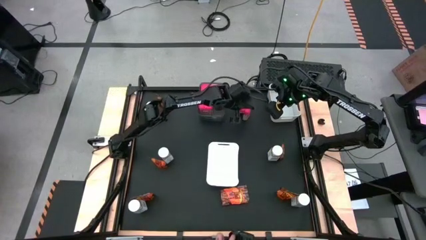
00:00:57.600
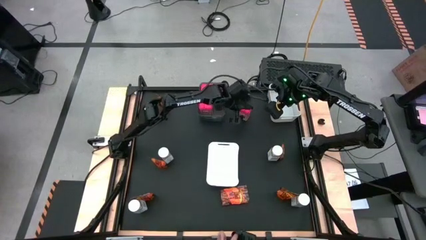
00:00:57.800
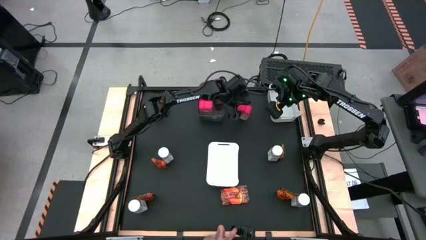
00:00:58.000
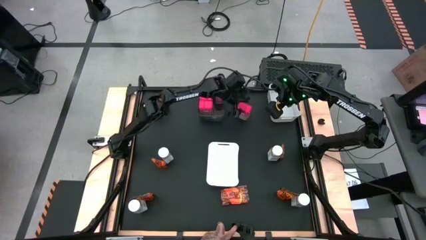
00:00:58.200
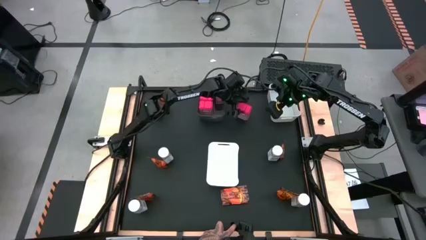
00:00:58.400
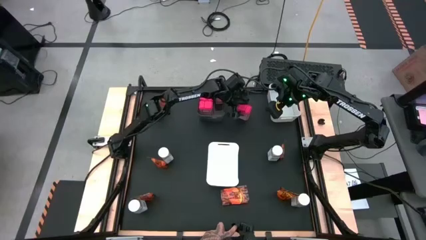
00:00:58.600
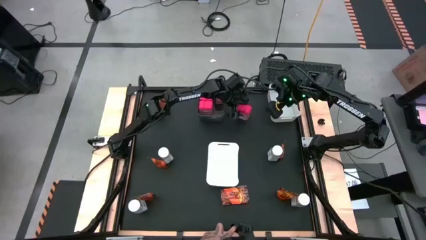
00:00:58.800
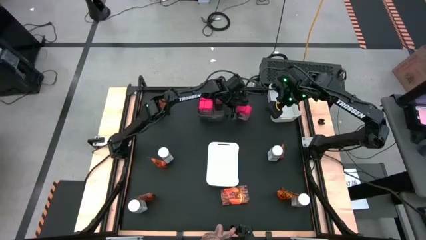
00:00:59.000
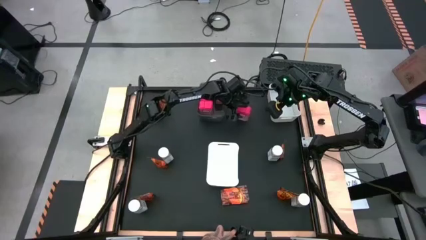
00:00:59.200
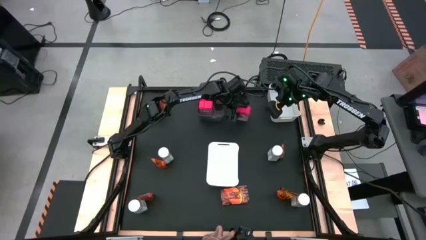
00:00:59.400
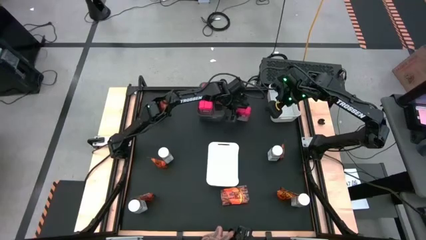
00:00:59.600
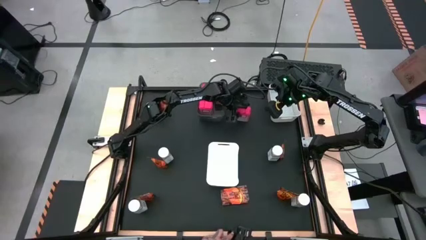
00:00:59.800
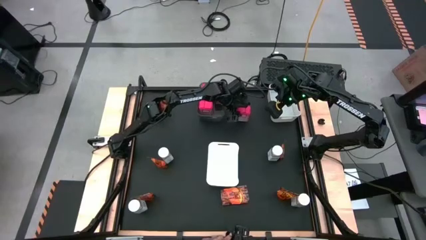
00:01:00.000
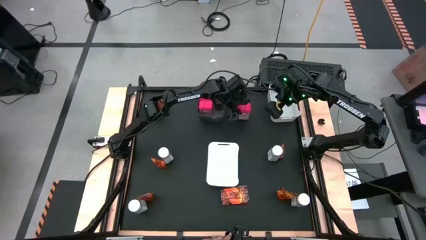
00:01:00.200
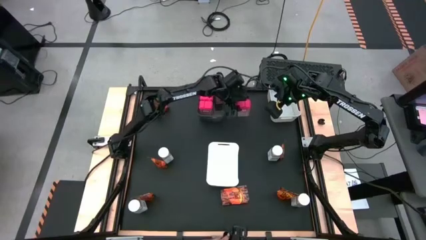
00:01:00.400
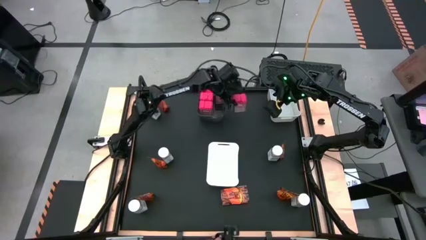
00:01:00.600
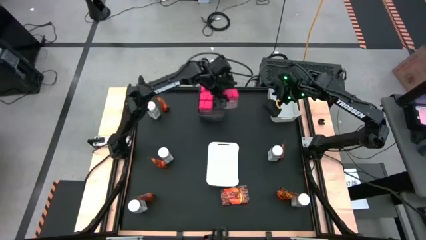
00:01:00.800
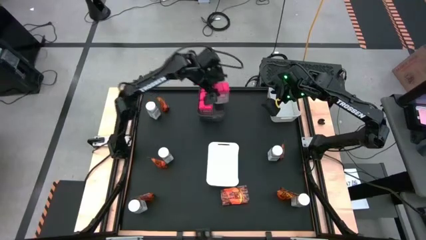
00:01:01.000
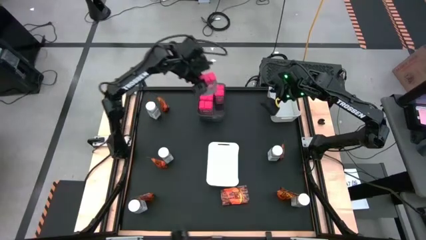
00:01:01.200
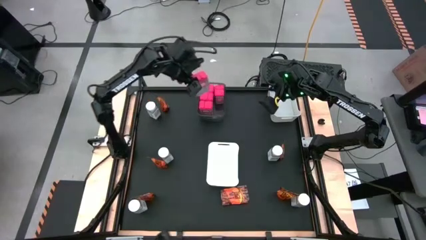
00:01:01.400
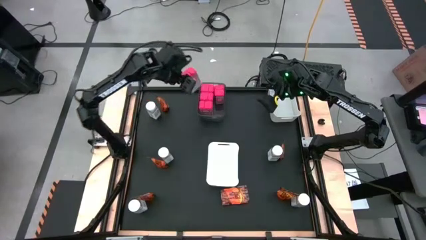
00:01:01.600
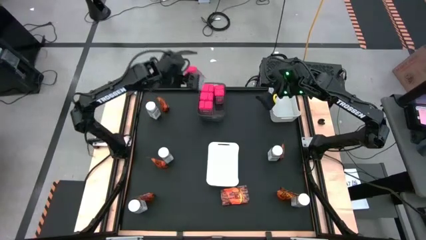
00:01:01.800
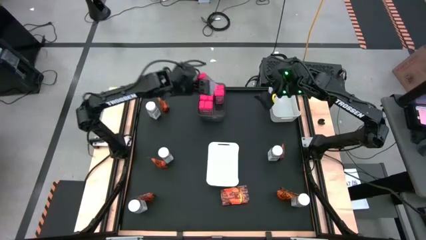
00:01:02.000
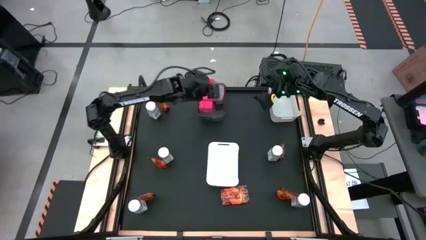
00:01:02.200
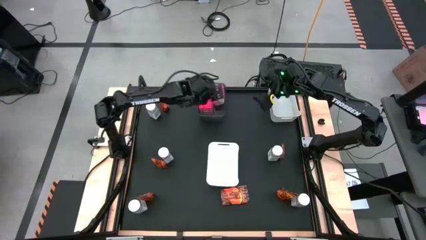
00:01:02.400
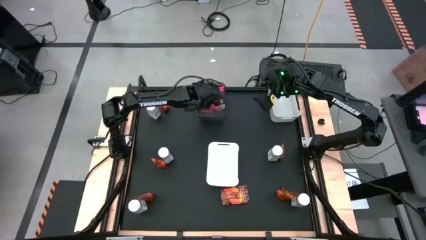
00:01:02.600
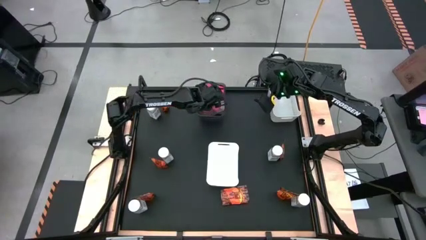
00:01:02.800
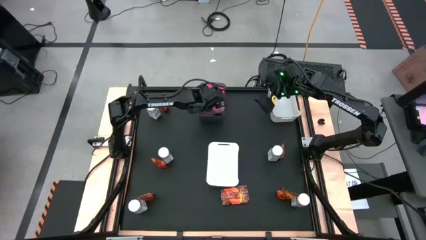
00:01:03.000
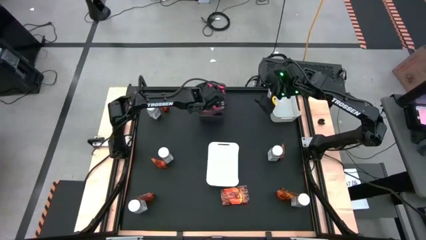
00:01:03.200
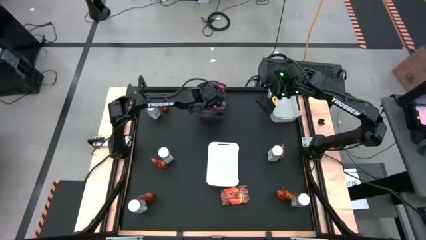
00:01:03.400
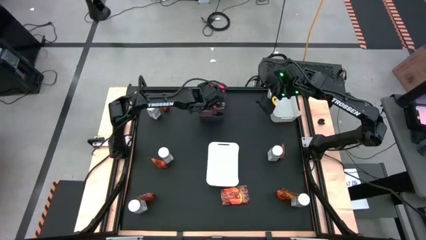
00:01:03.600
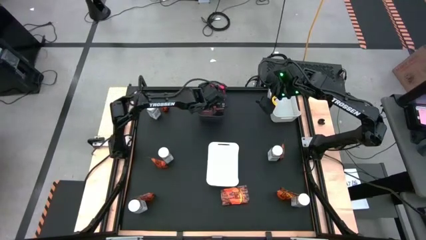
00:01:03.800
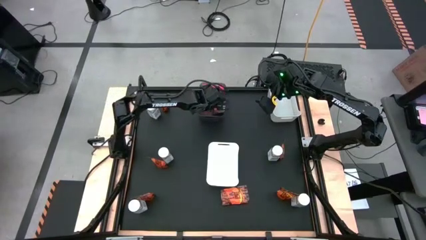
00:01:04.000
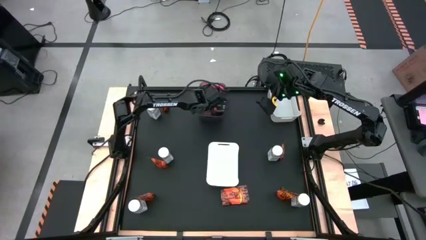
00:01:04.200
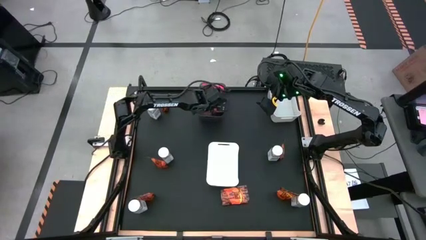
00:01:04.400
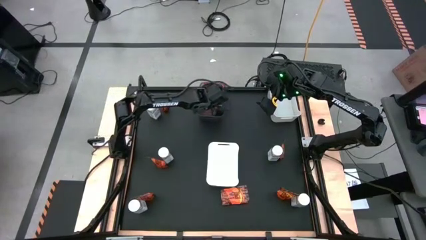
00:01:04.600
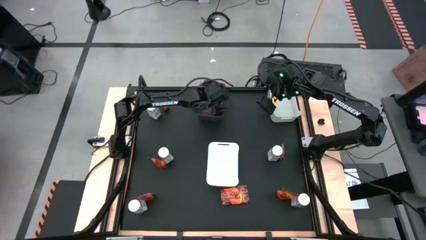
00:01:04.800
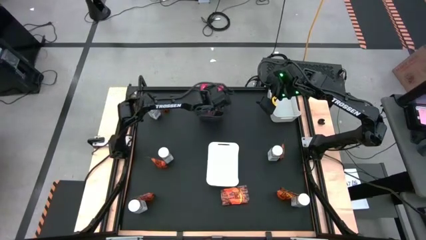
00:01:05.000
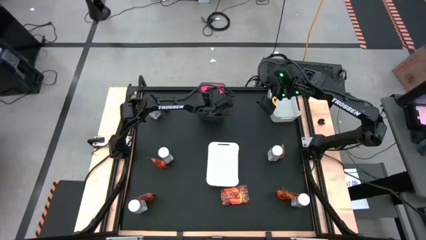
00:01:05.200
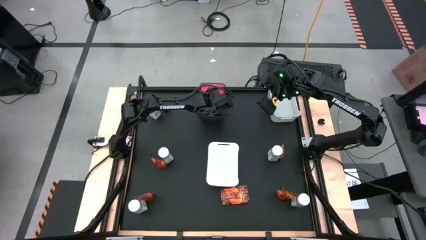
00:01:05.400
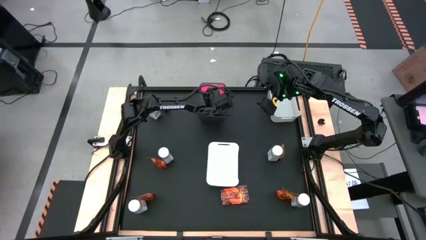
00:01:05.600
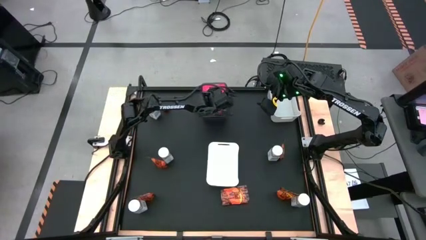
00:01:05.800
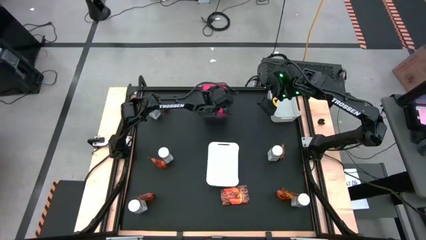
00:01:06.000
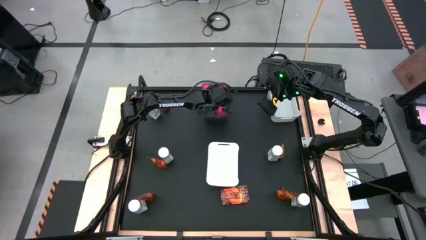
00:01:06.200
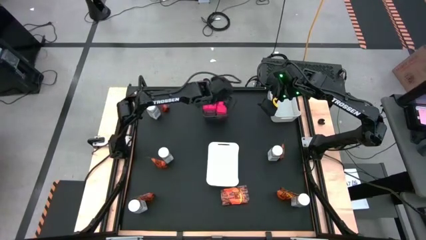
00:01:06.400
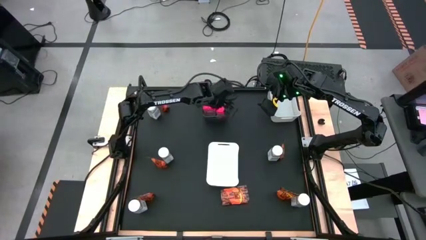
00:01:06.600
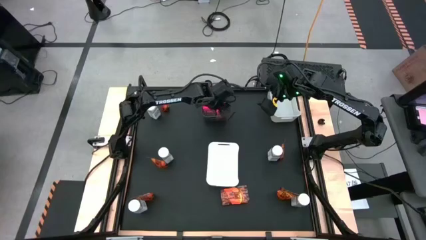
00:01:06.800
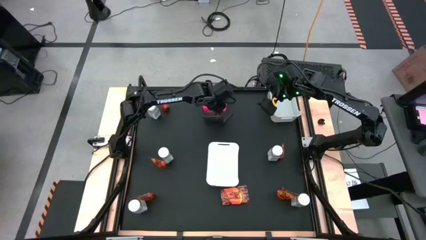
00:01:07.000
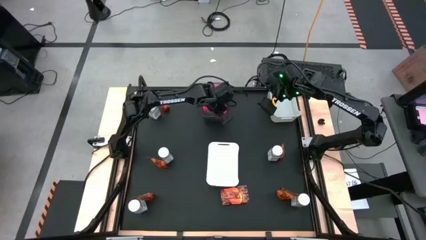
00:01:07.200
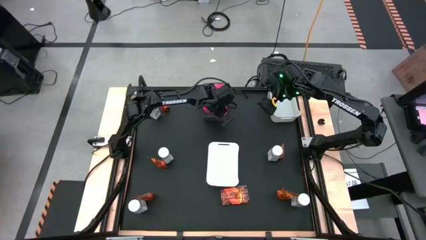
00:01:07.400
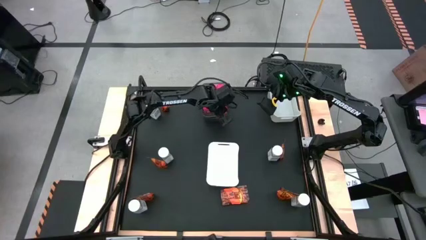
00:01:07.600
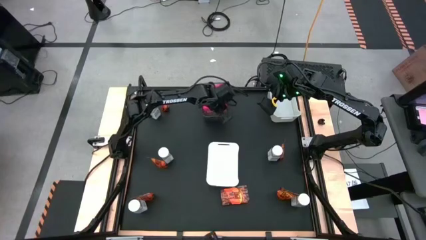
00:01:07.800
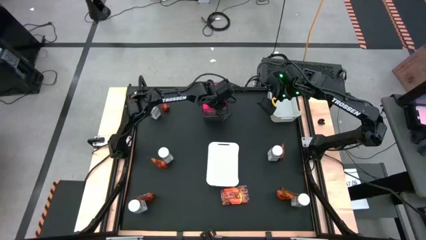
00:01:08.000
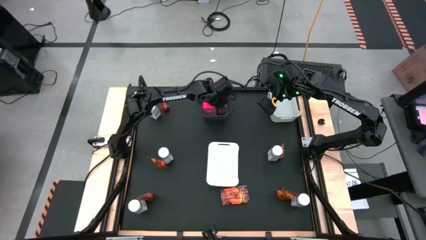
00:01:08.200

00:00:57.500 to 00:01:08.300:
Task: Sort spices by type
Put the red seasoning can into the black bin

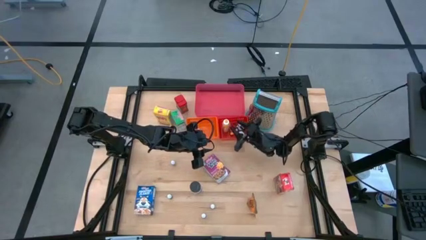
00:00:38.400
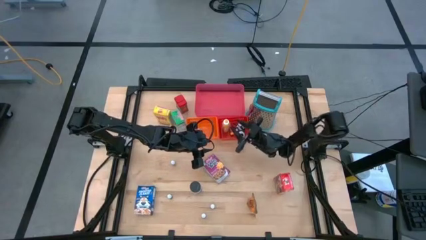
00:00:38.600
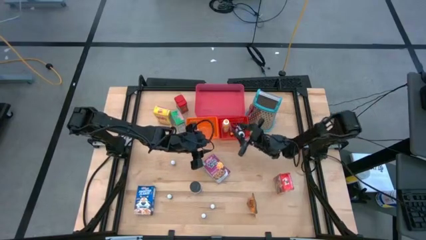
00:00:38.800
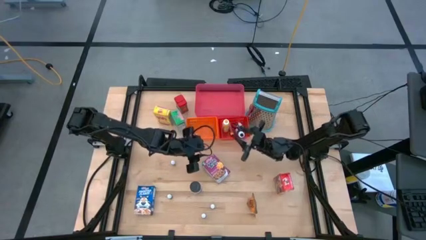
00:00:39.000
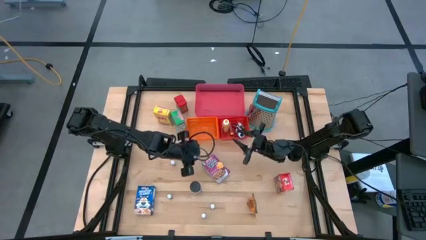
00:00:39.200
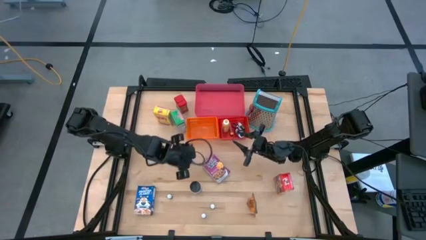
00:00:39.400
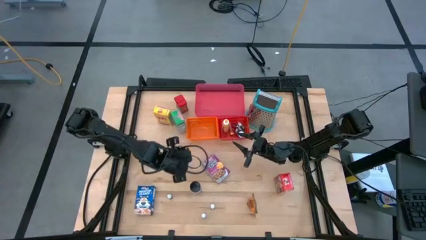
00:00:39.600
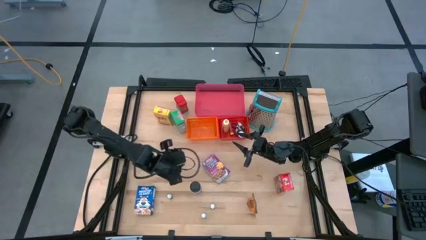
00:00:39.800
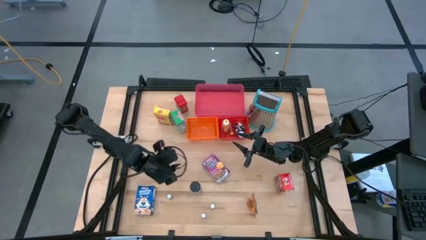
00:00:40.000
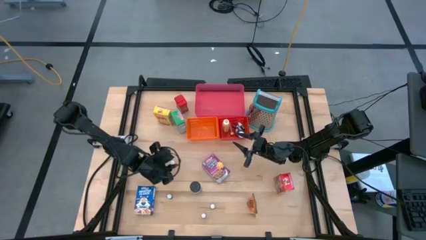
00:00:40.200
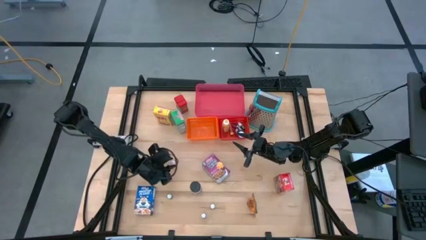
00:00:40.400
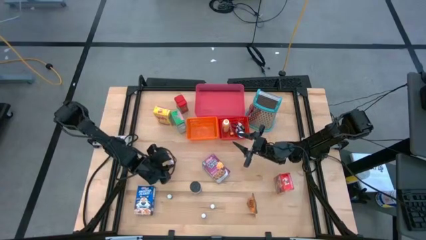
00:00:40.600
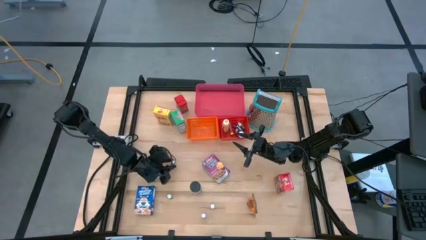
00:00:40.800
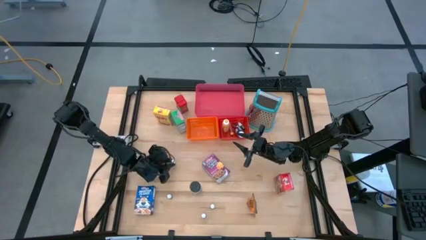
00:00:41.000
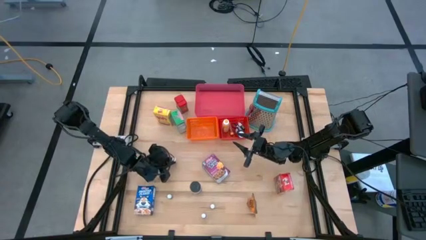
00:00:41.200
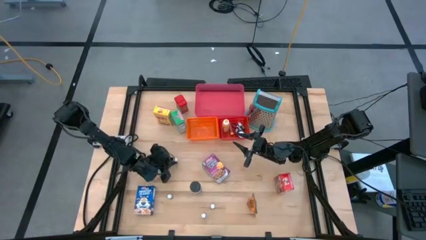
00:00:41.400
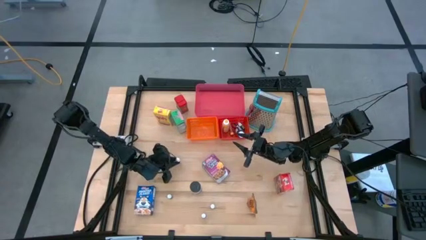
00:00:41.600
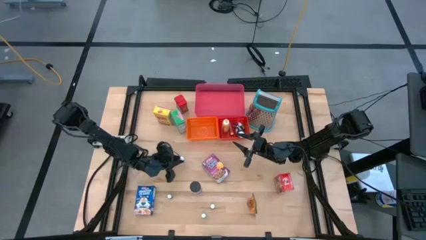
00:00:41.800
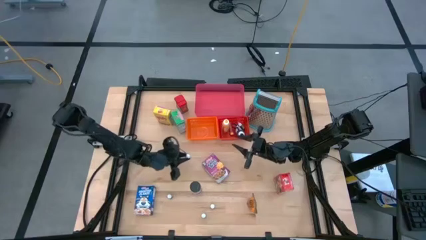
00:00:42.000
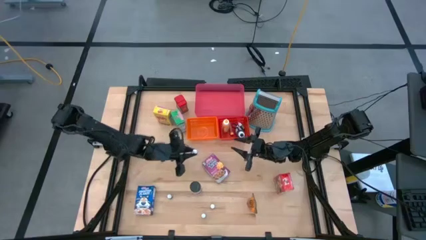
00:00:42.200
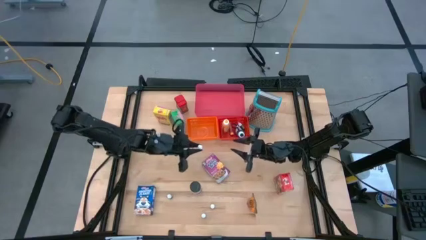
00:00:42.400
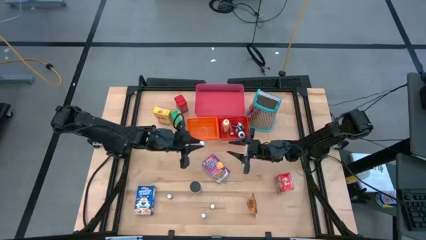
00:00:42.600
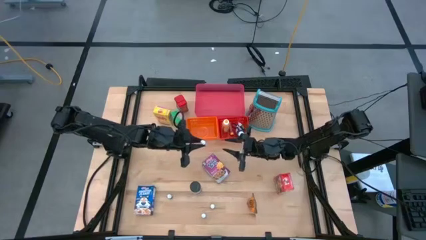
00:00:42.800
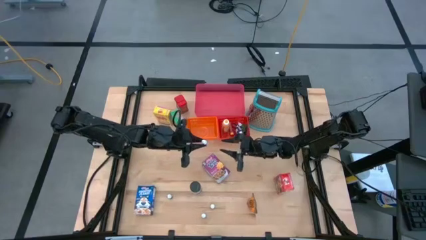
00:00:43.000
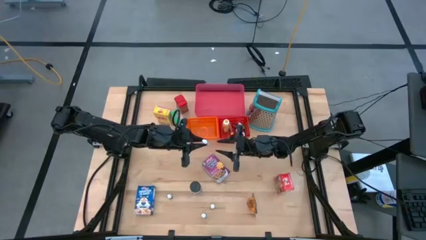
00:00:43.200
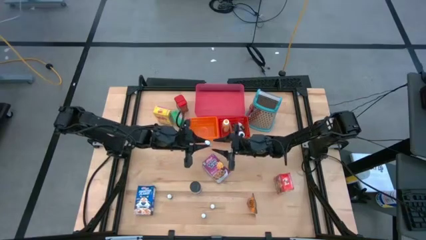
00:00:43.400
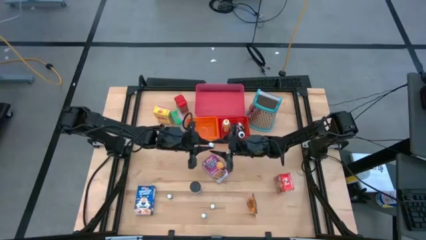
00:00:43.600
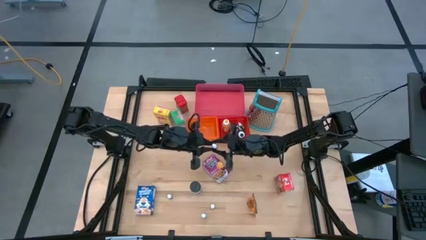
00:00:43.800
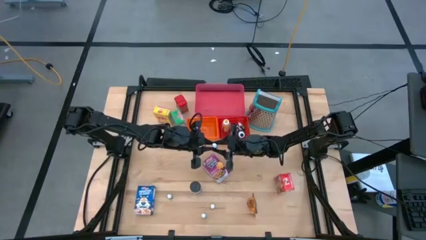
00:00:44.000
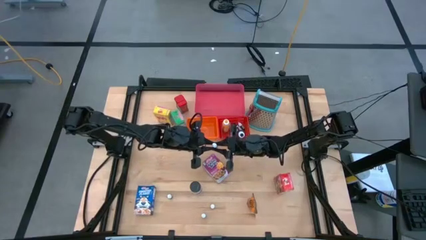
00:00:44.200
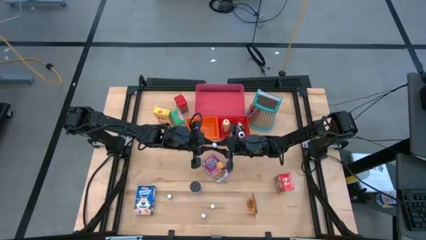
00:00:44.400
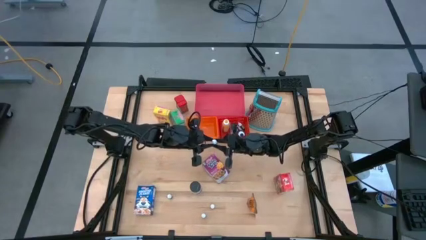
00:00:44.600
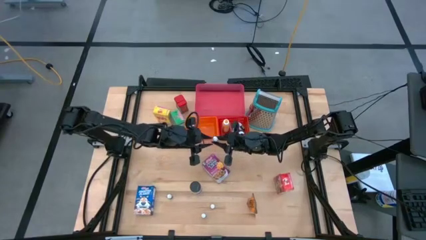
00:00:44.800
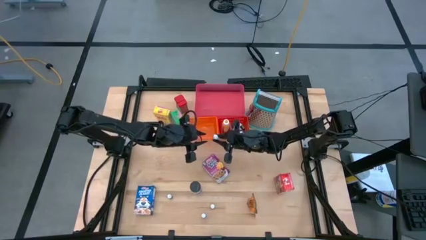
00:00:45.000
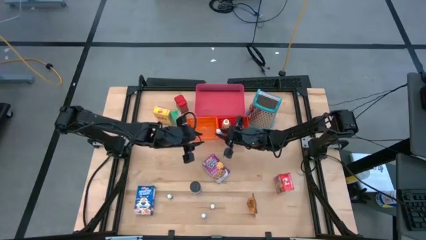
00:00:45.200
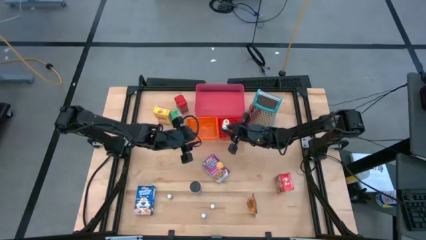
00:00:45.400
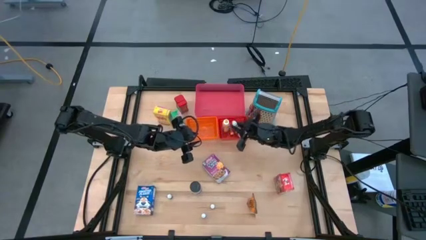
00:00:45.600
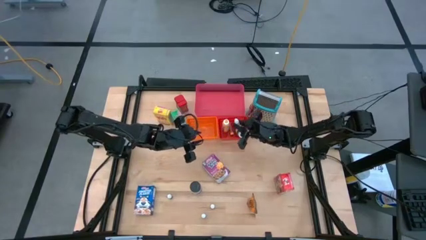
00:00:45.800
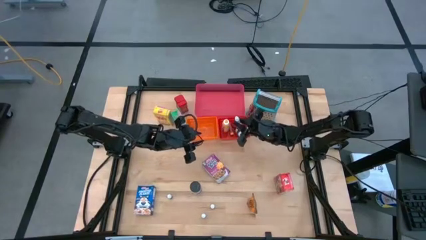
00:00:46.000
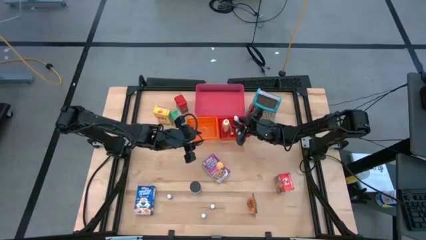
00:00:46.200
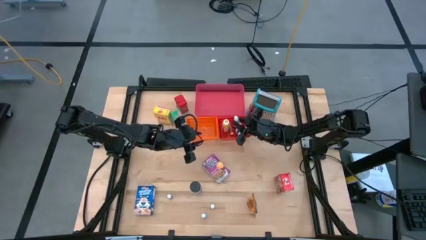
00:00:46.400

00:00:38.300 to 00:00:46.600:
Task: Pick & Place Kitchen Items
Put the orange food coloring bottle into the red bin
